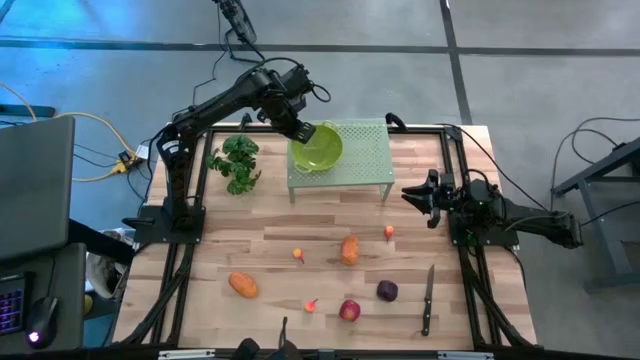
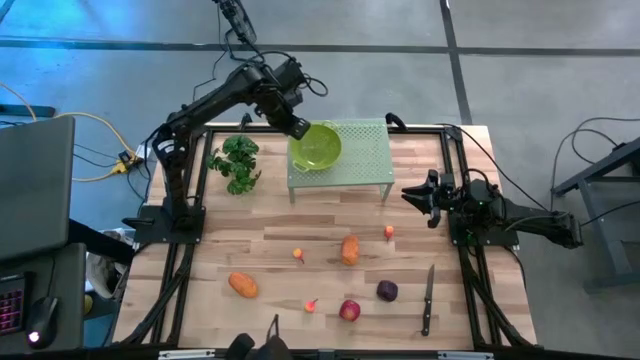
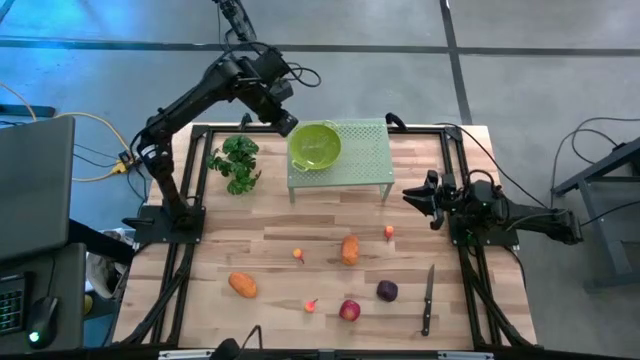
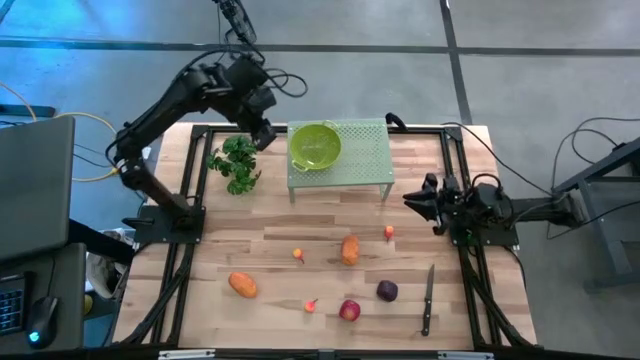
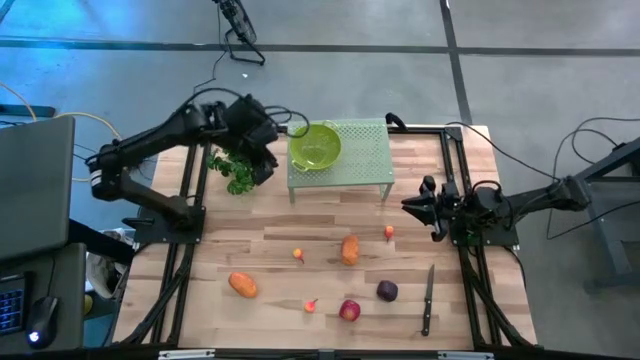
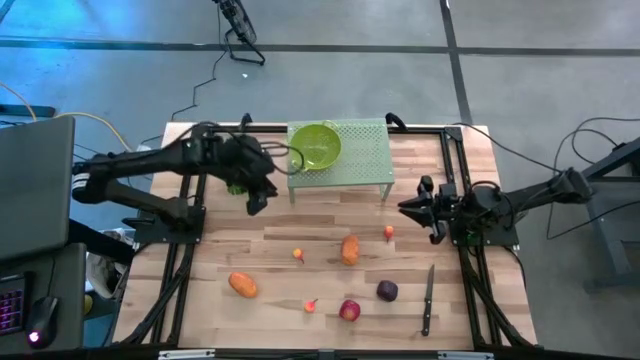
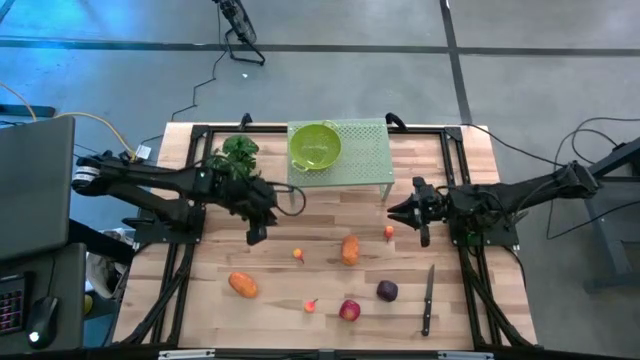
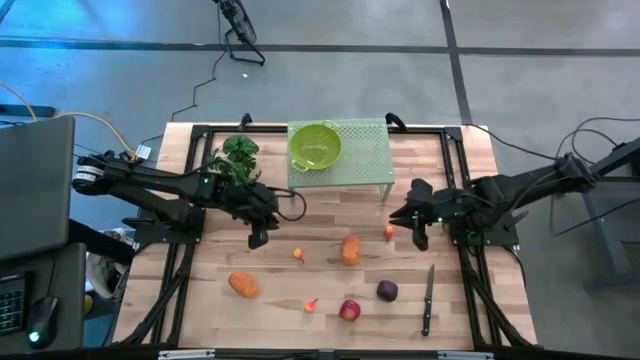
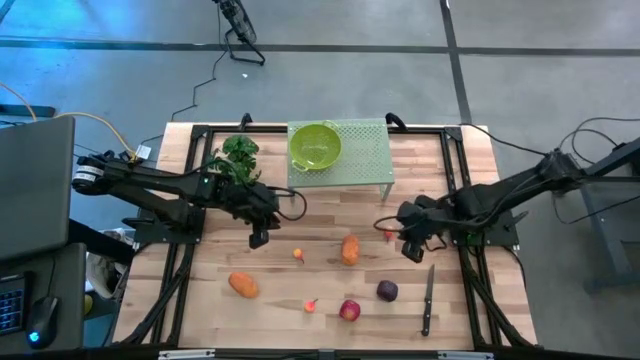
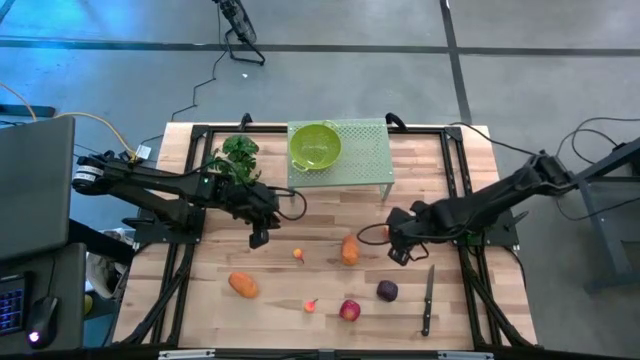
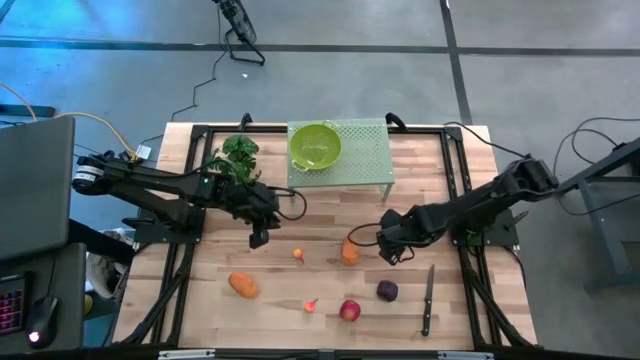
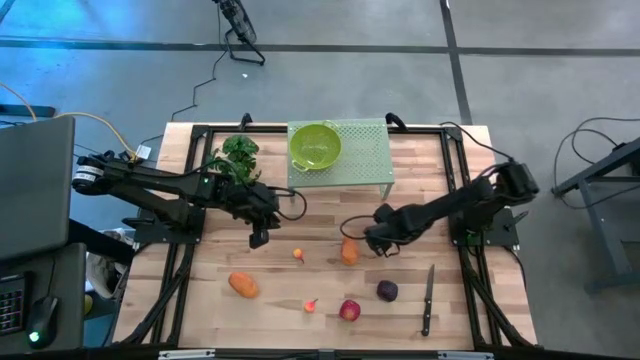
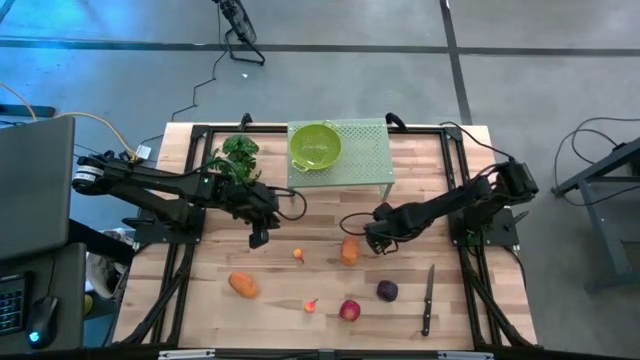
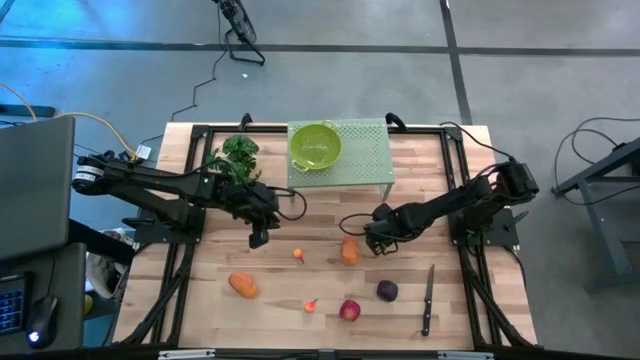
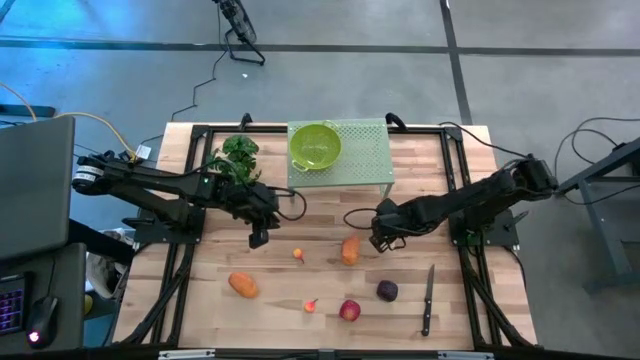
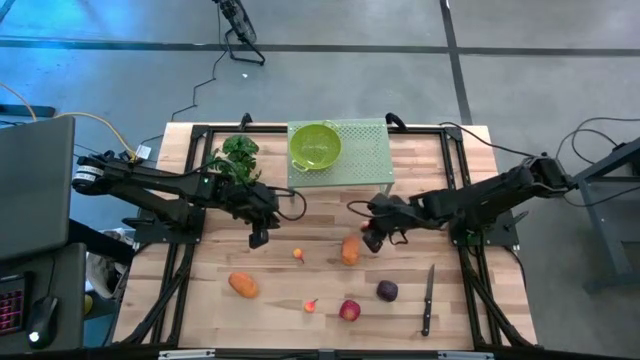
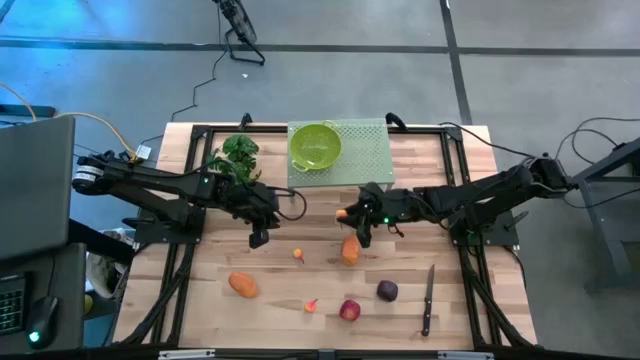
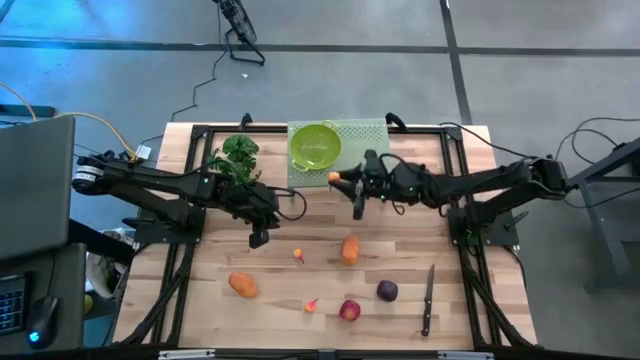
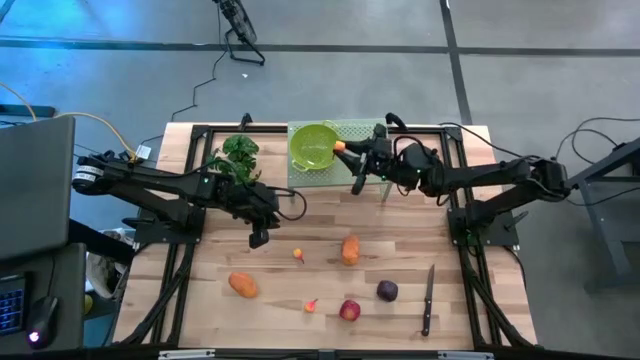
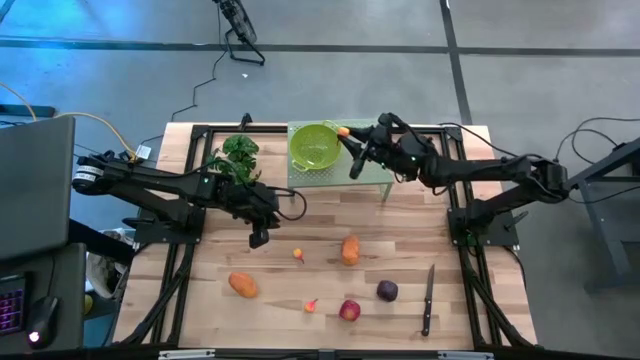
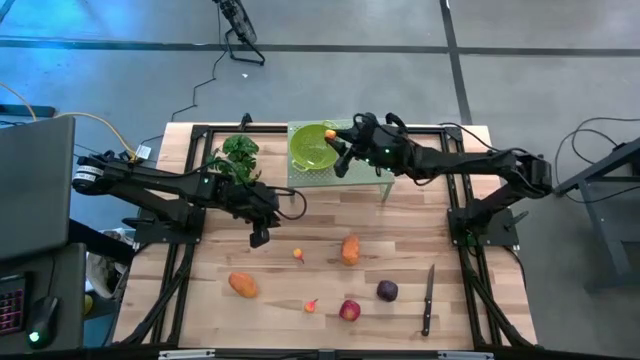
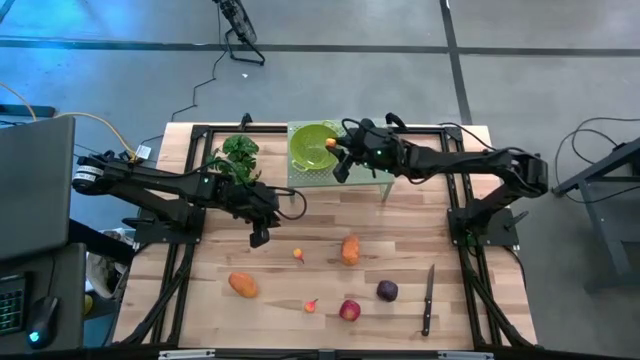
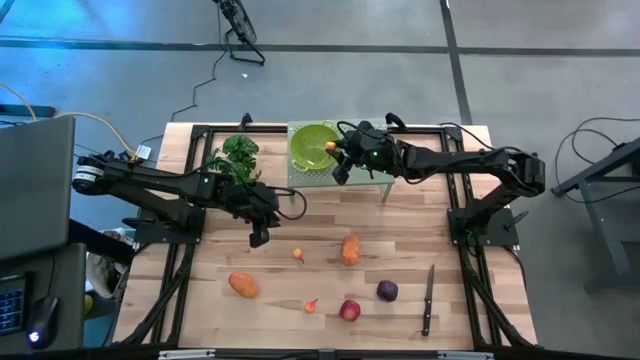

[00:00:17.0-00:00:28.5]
Task: Pick & Place Fruit
Put the top orange pear into the green strainer bowl on the shelf

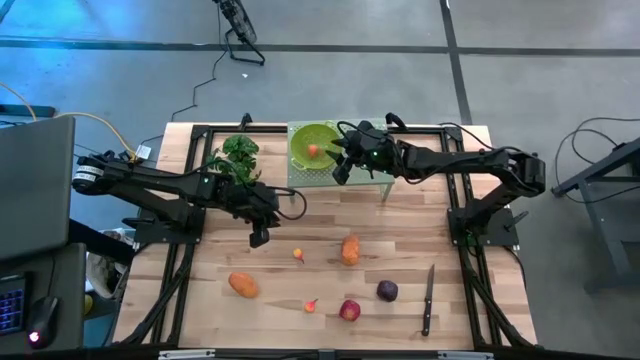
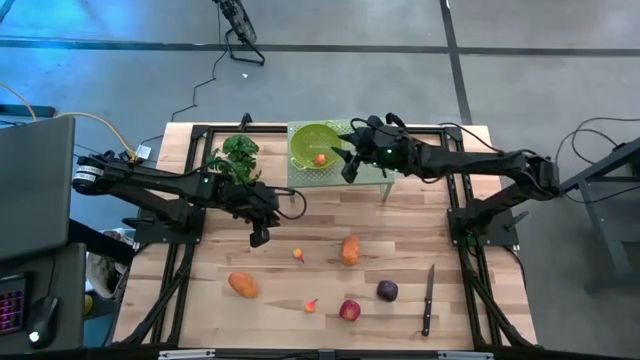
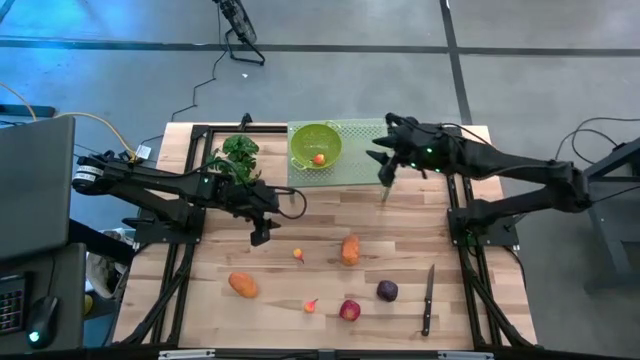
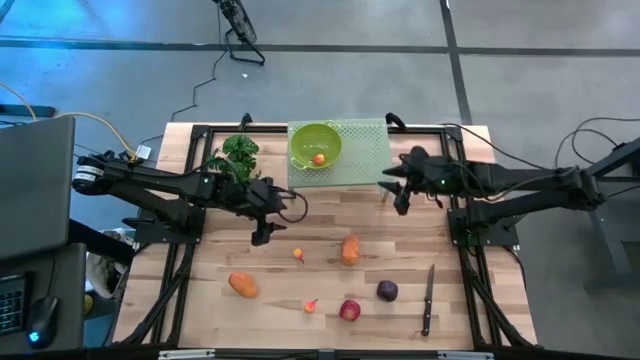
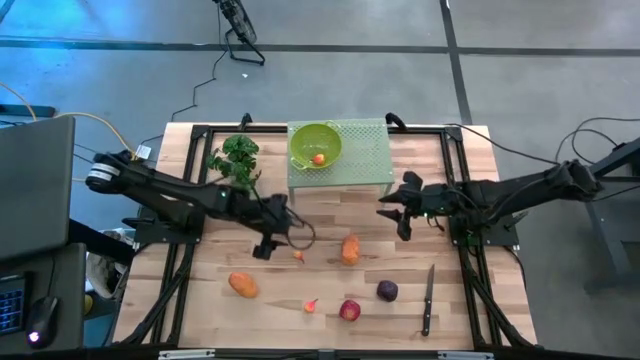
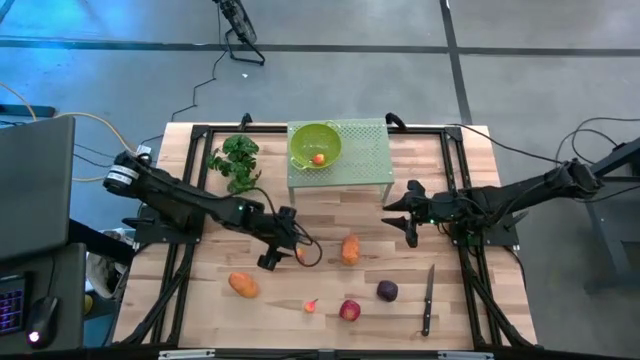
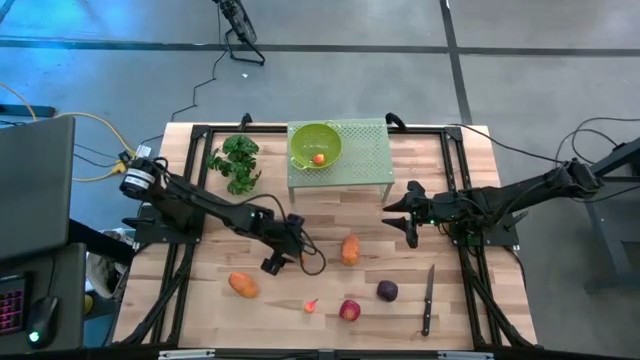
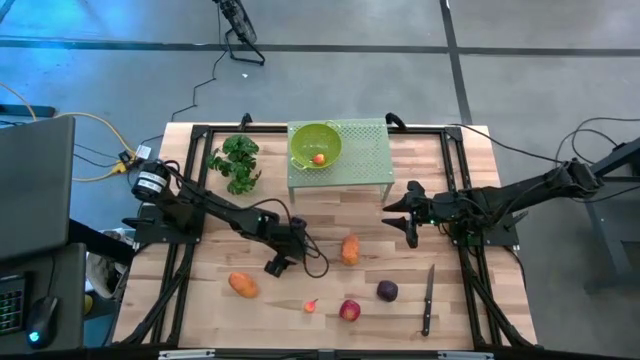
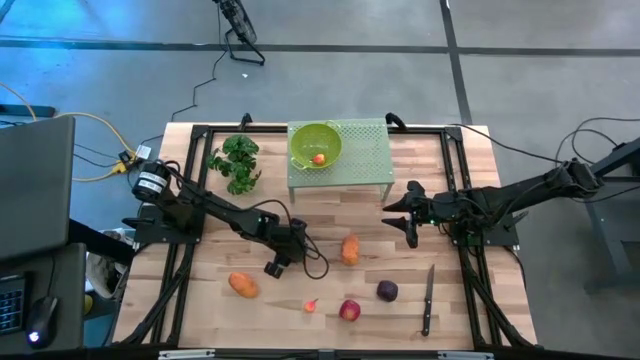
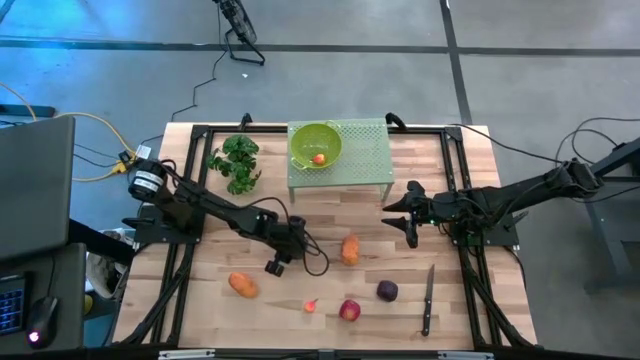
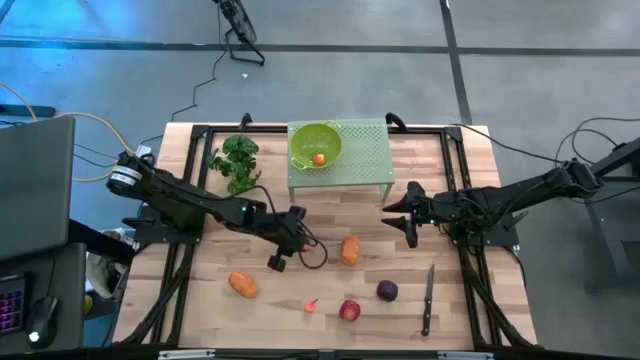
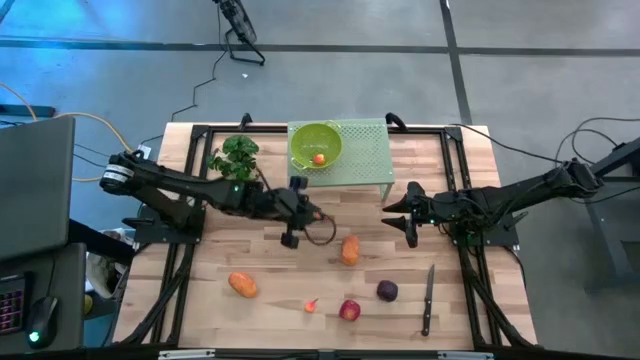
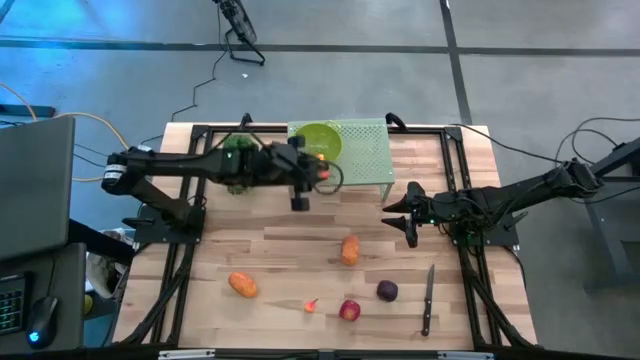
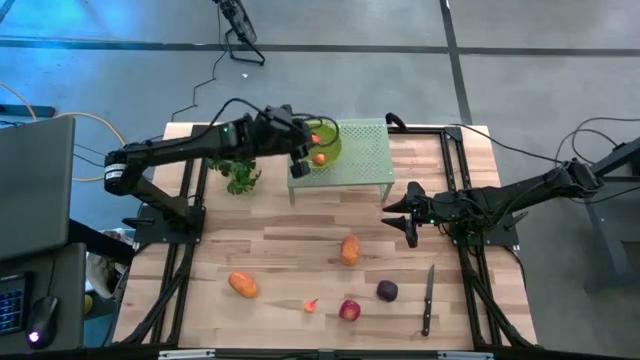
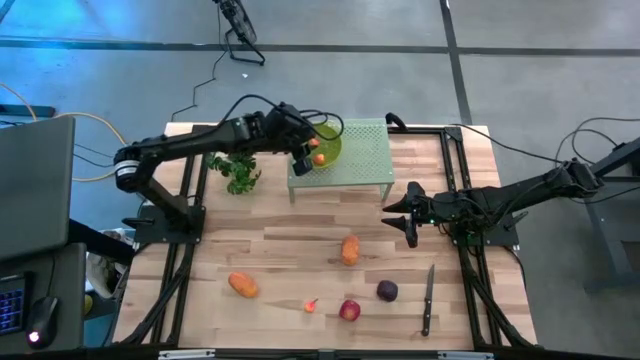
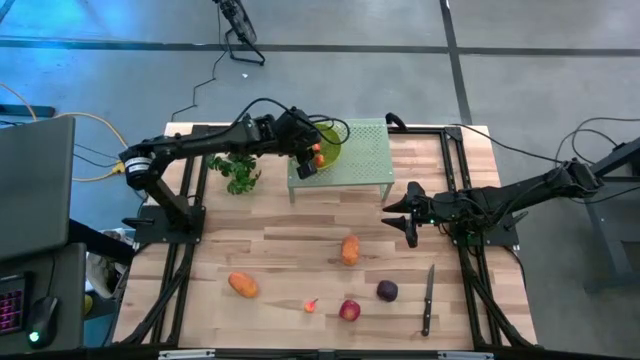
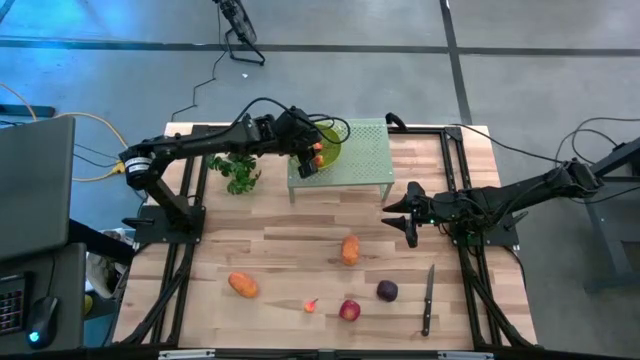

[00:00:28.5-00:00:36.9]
Put the top orange pear into the green strainer bowl on the shelf

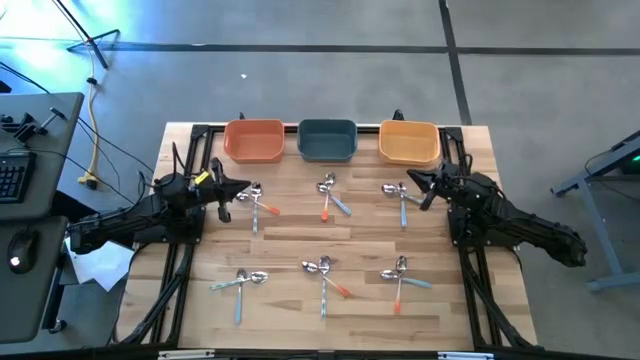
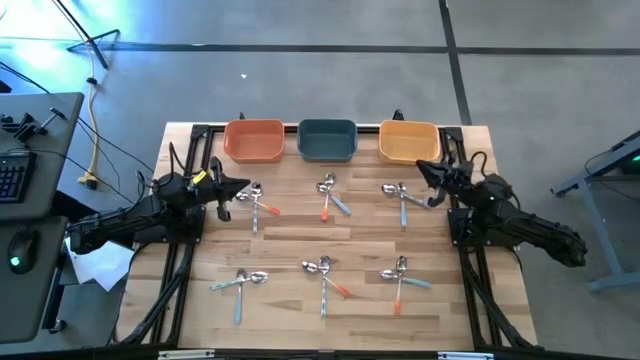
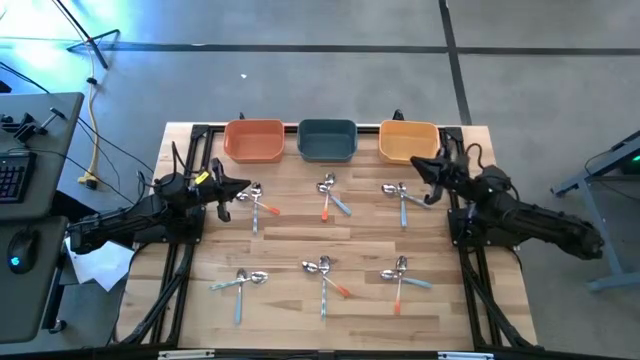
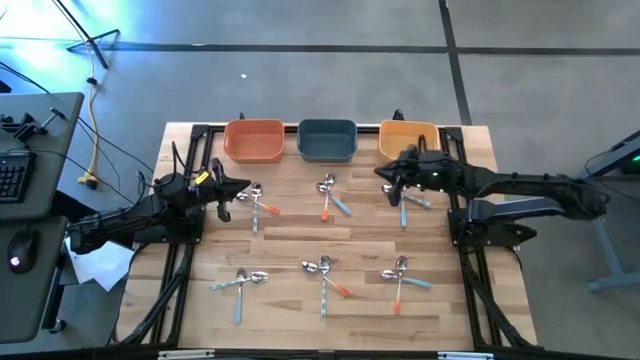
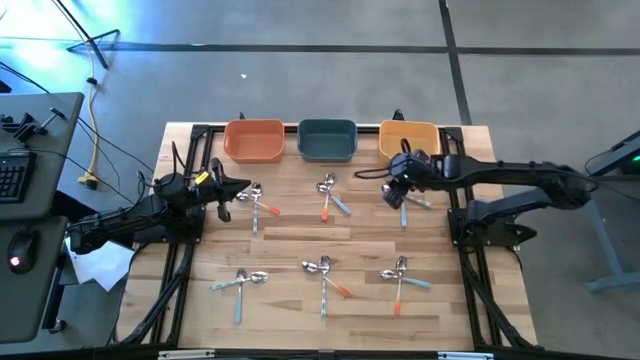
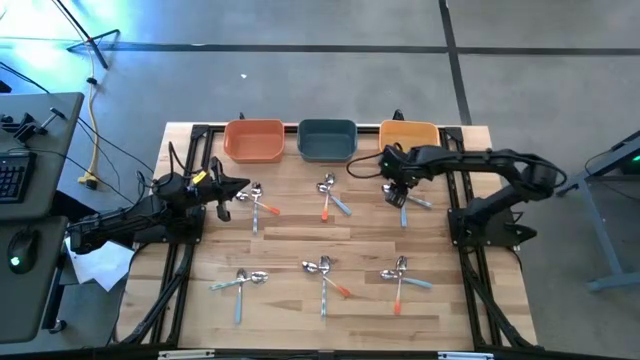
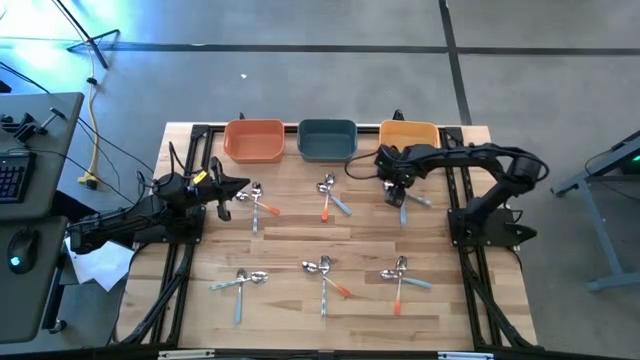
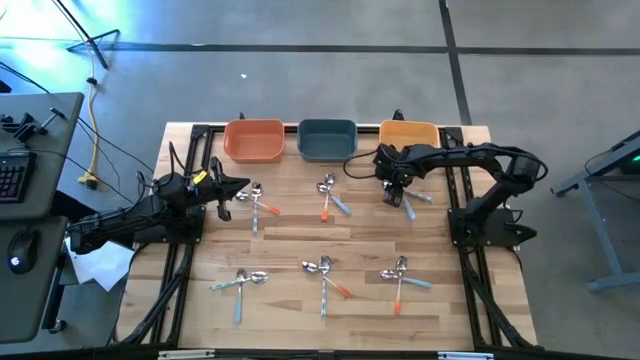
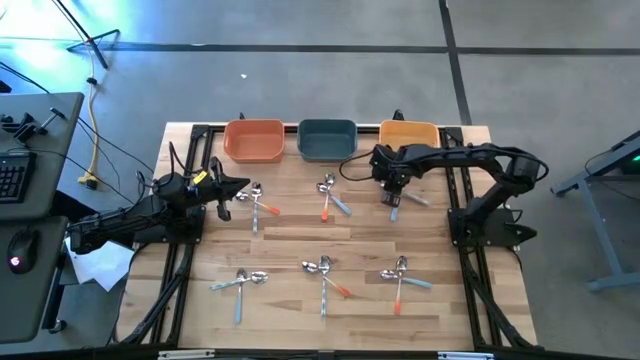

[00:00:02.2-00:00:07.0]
Task: Sort silverware by color (type)
Put the white spoon into the blue bin
